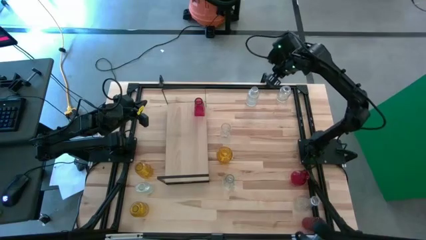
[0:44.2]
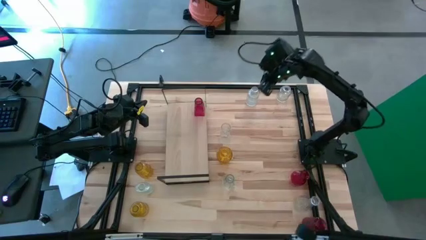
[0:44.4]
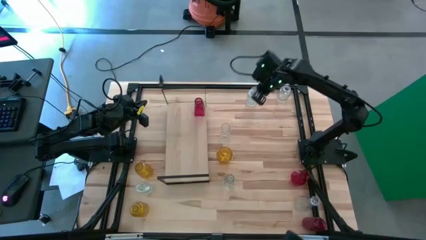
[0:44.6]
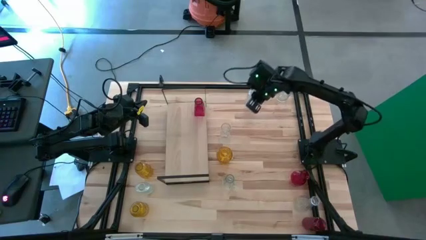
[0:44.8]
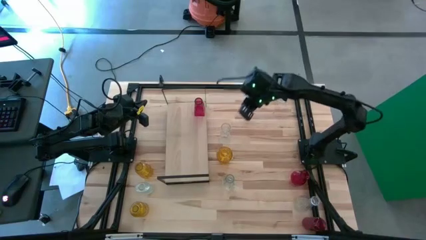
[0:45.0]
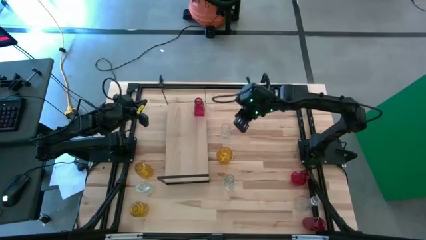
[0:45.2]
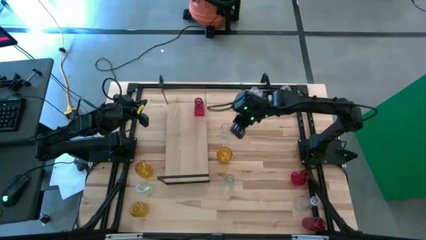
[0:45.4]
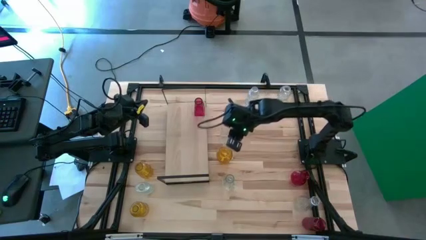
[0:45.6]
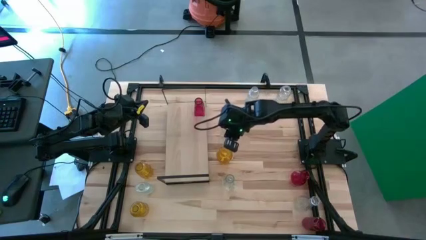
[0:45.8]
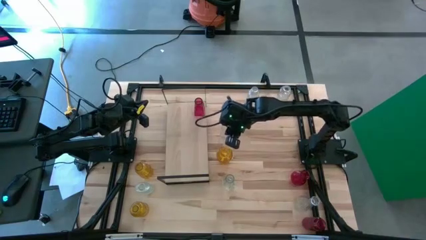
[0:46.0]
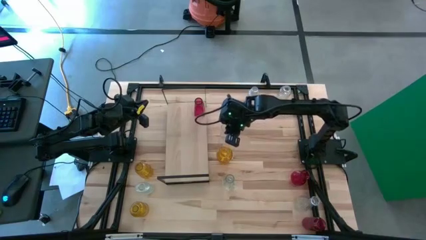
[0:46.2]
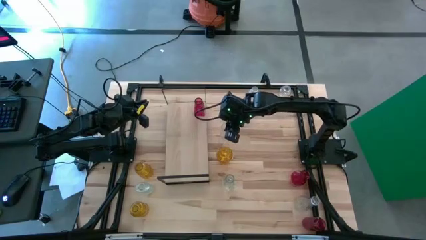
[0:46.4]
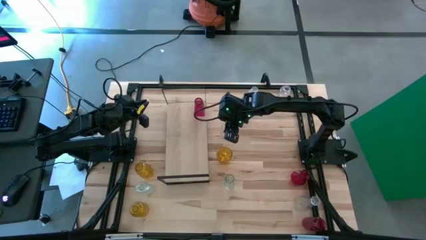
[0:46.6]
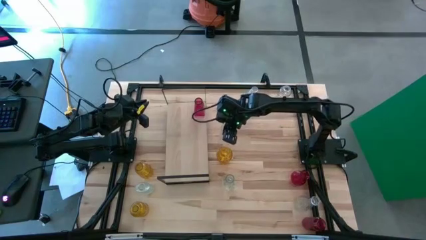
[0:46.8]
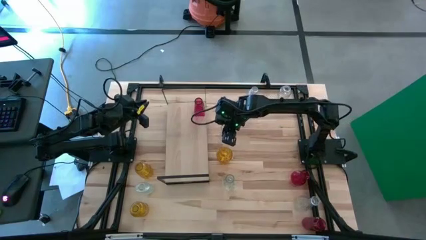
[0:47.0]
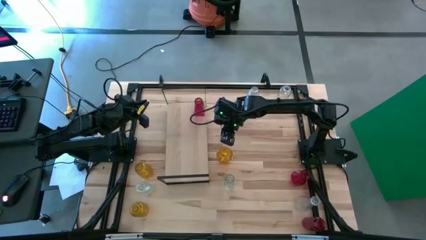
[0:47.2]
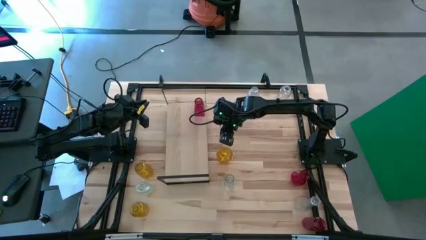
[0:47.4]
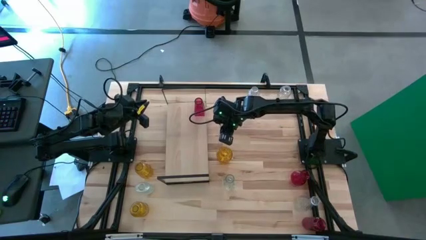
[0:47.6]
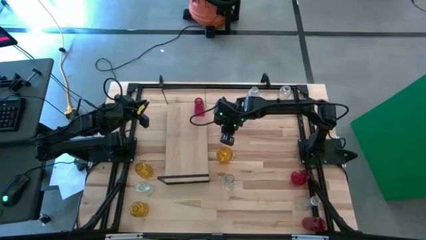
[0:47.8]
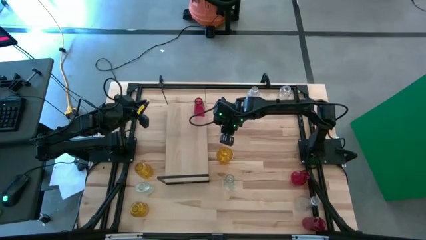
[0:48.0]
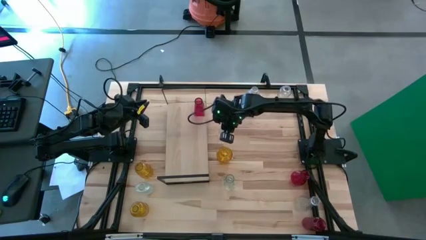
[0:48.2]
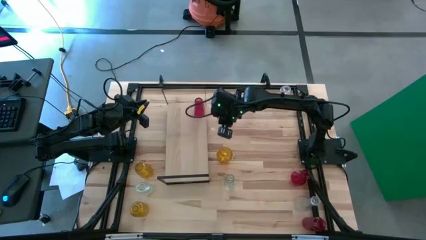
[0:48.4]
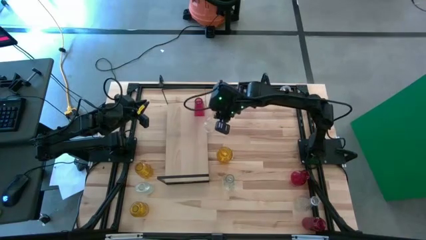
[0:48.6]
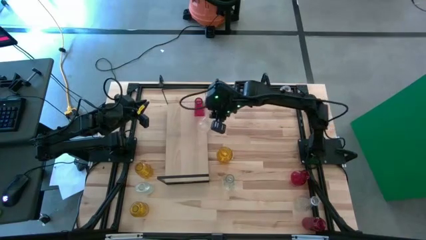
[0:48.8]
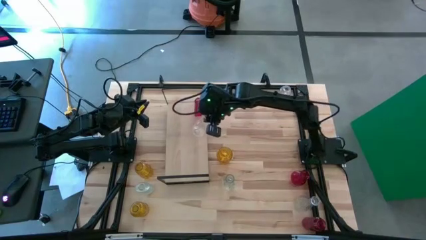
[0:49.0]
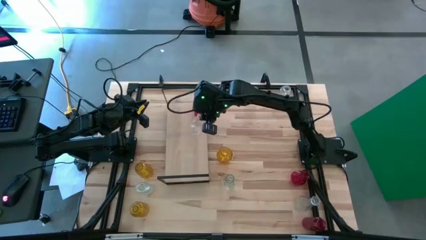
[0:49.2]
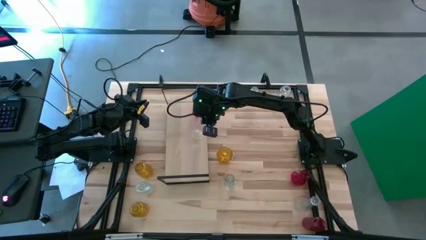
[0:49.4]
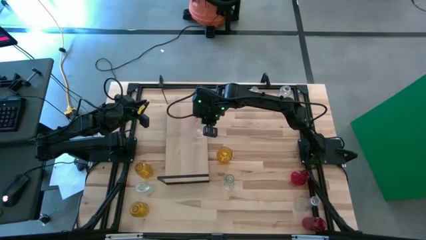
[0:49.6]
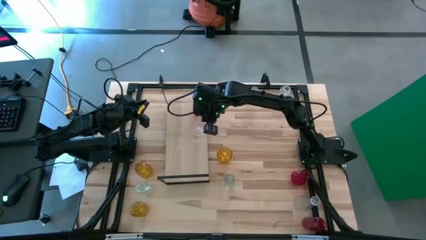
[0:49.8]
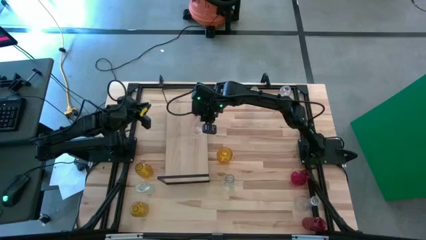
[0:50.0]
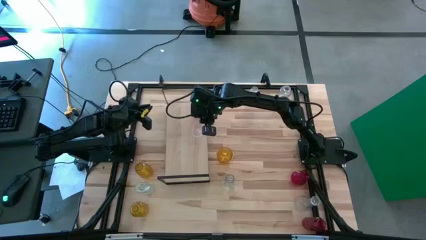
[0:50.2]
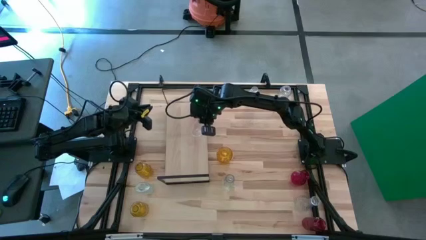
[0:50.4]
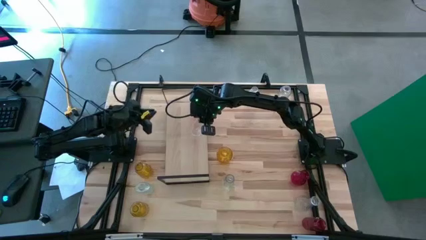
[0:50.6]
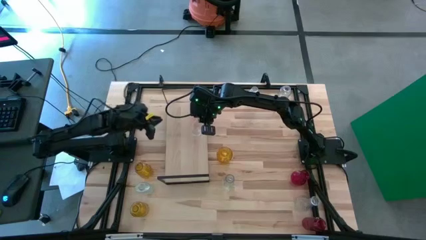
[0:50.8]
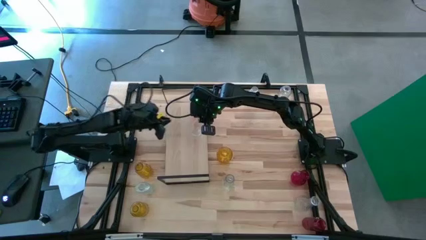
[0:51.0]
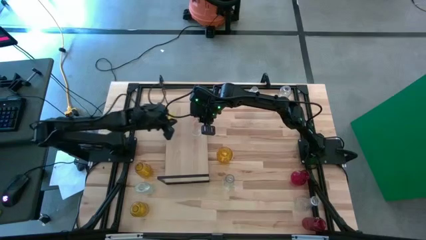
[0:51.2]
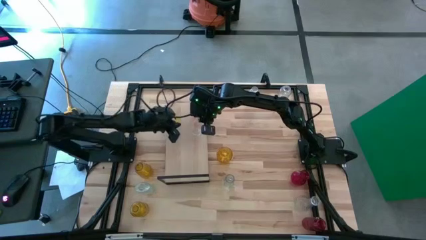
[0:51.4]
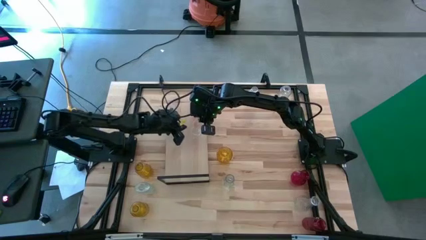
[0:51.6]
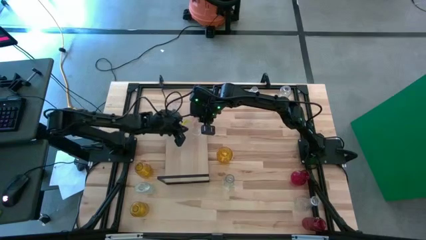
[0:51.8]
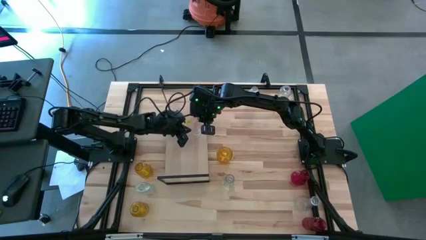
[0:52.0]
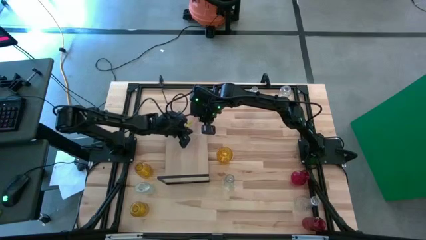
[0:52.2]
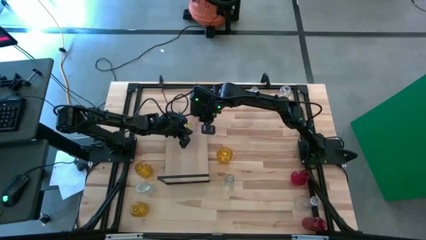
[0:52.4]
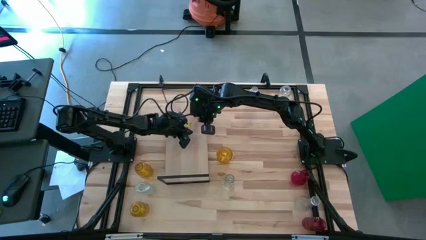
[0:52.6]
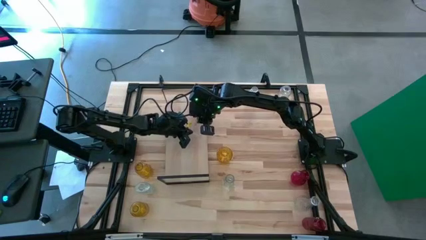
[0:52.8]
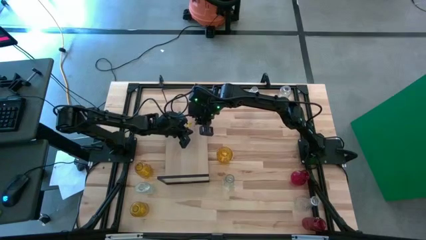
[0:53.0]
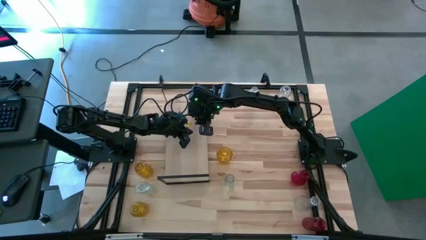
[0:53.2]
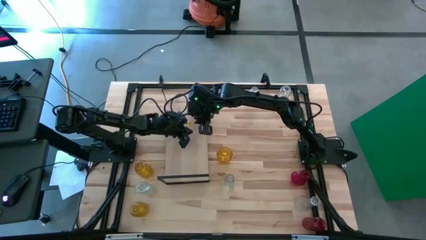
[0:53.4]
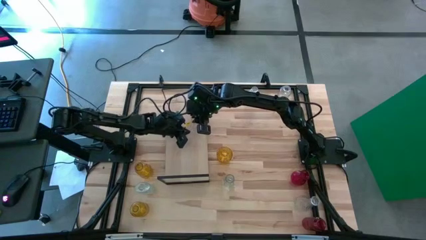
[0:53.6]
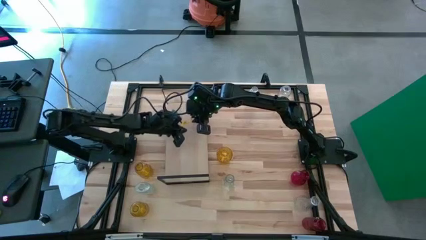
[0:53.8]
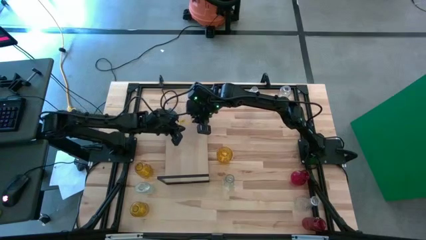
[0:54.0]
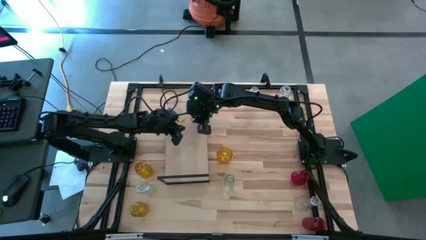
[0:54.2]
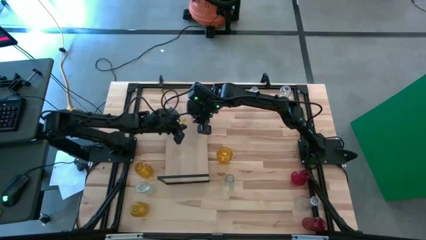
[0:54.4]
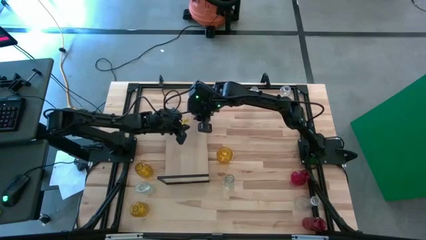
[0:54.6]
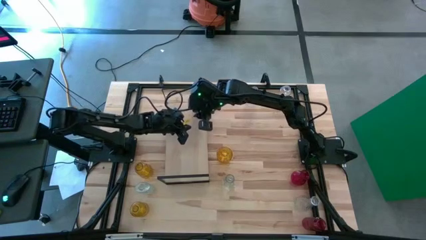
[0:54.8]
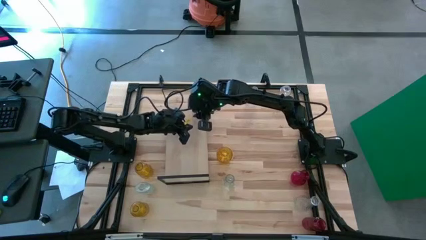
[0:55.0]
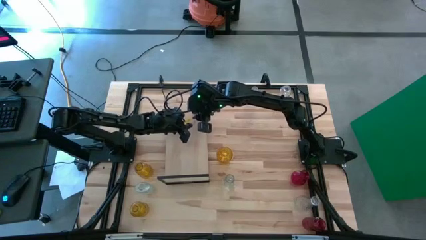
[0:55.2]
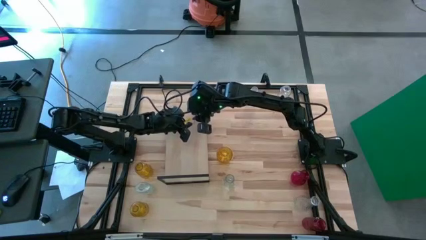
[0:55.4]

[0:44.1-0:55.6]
Task: sort vases onto shelf
Put the transparent vase on the shelf
